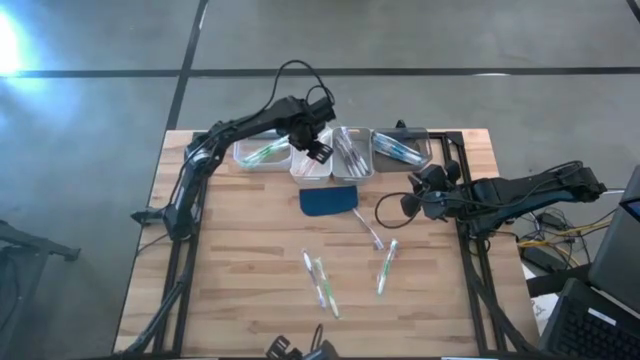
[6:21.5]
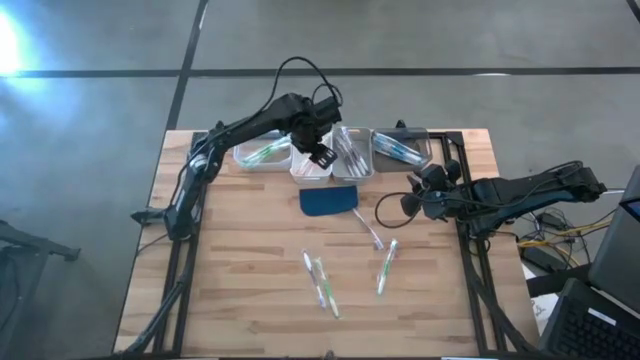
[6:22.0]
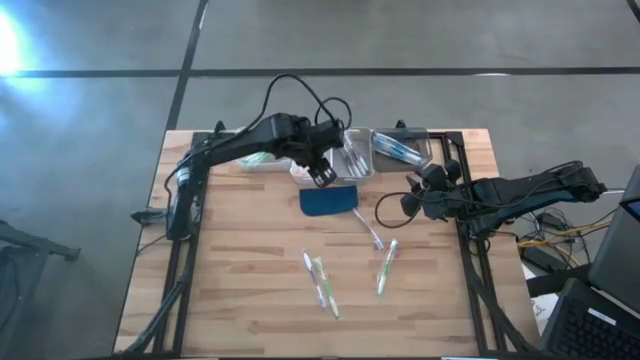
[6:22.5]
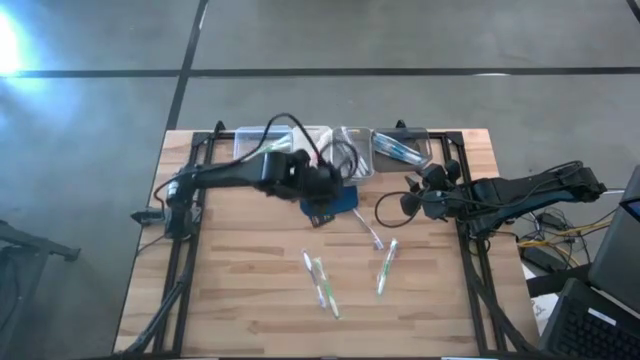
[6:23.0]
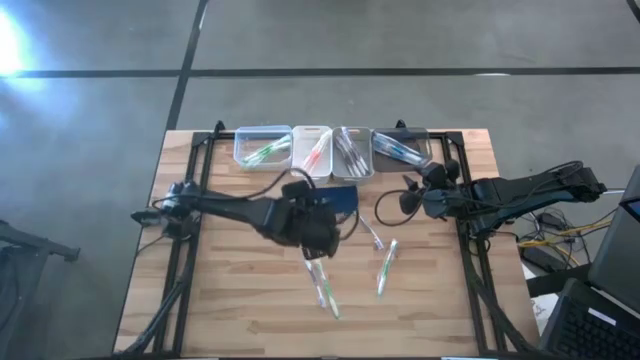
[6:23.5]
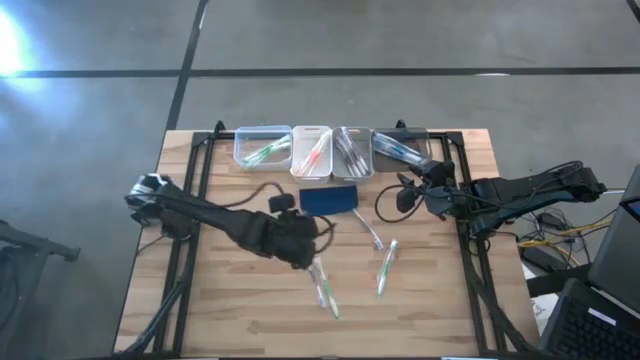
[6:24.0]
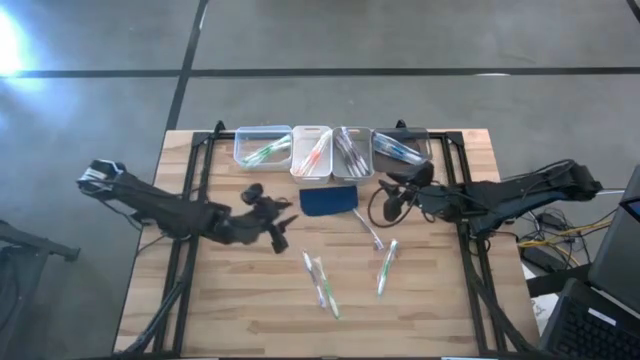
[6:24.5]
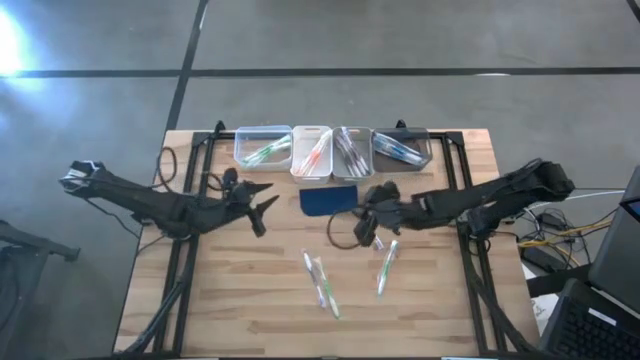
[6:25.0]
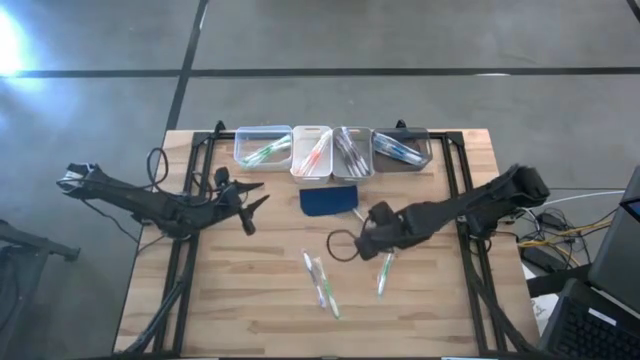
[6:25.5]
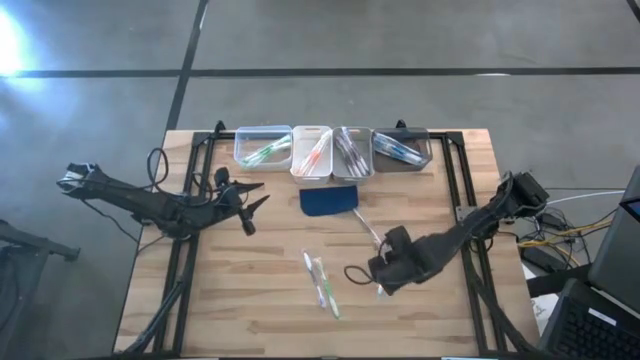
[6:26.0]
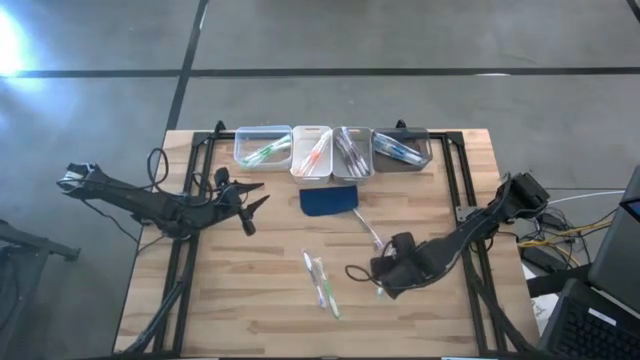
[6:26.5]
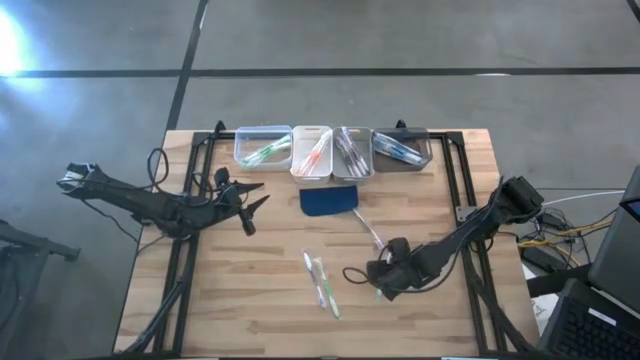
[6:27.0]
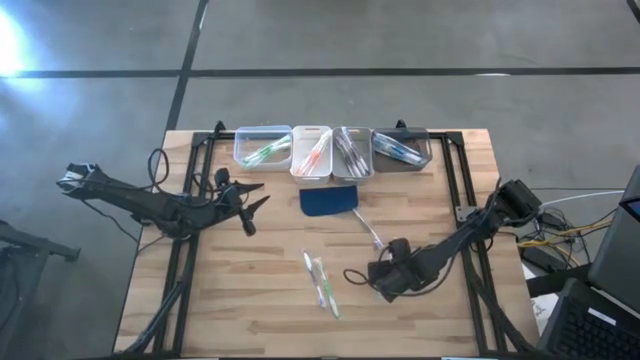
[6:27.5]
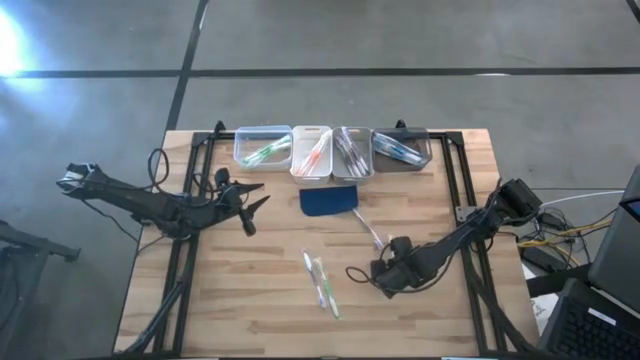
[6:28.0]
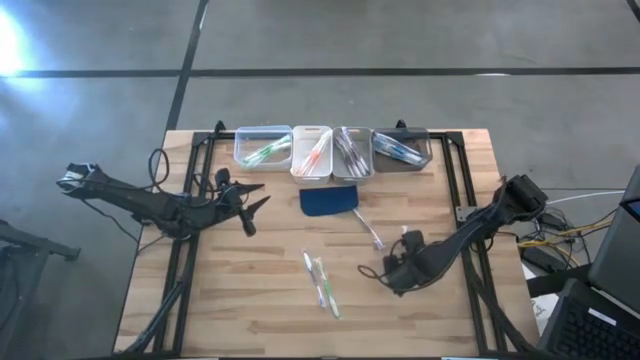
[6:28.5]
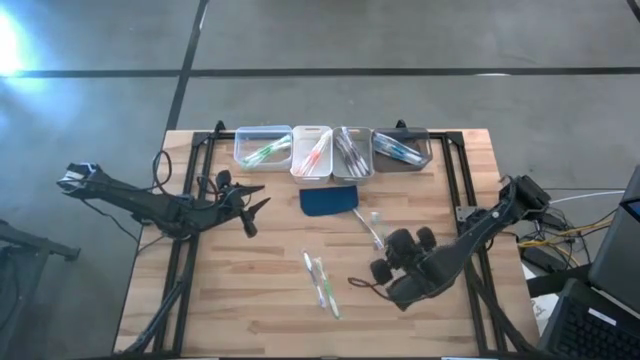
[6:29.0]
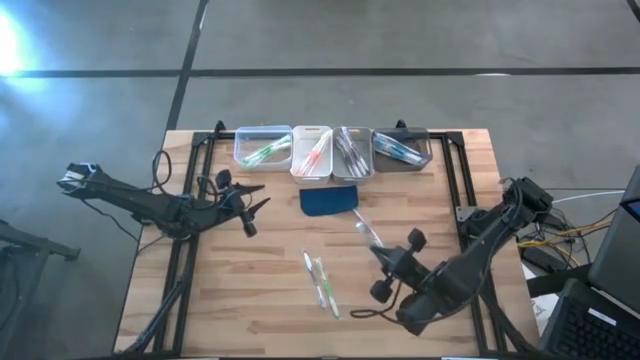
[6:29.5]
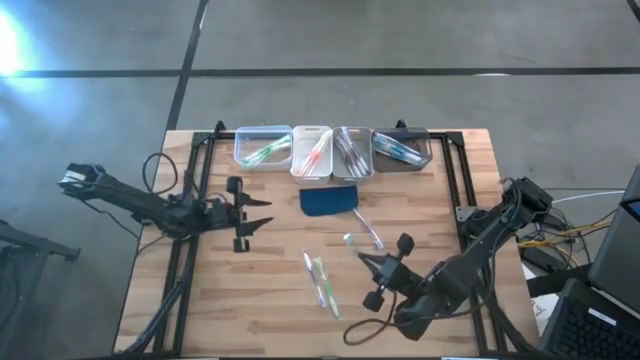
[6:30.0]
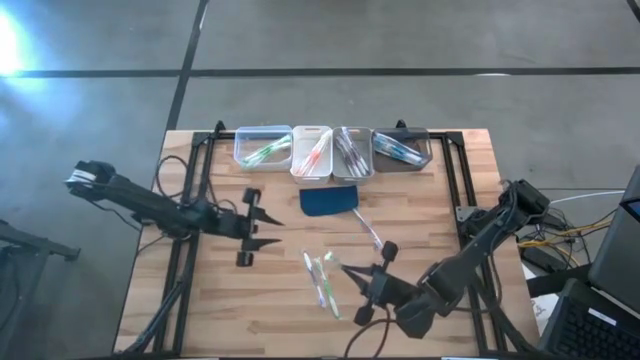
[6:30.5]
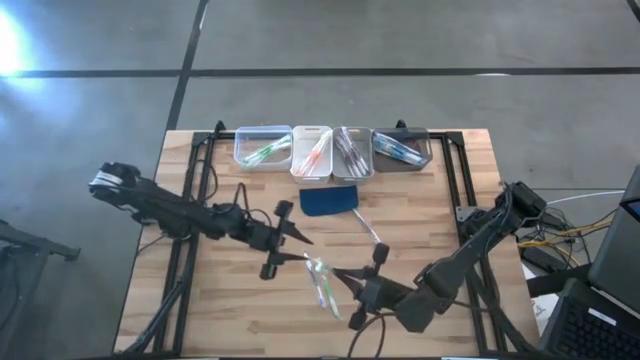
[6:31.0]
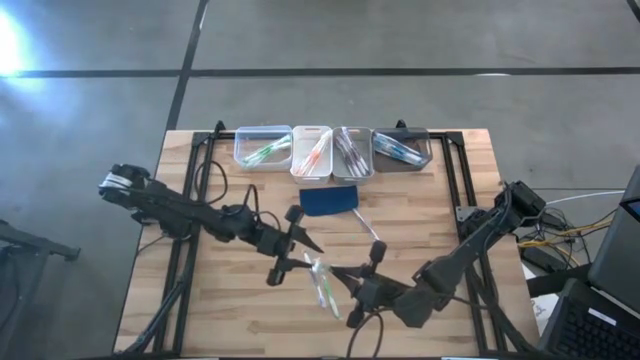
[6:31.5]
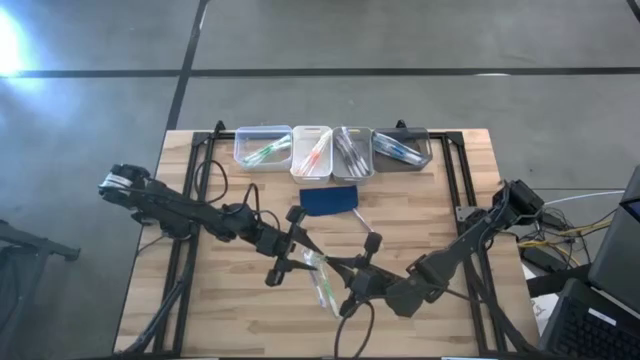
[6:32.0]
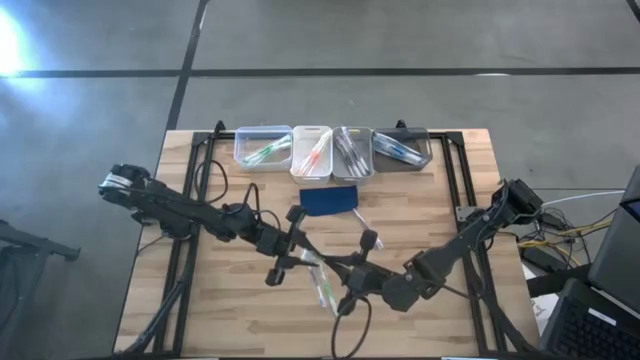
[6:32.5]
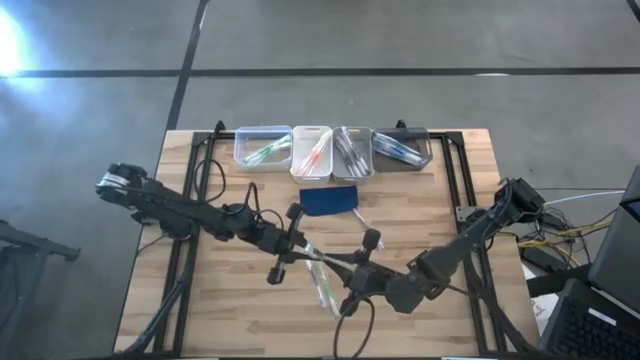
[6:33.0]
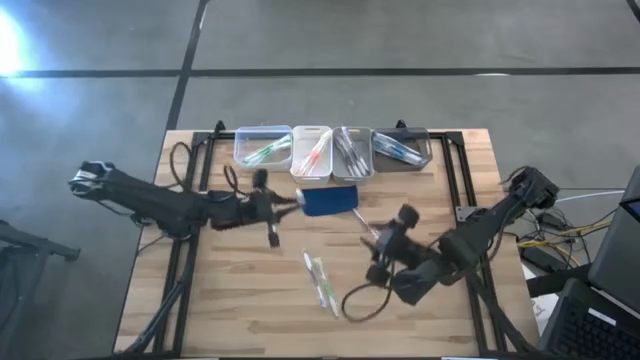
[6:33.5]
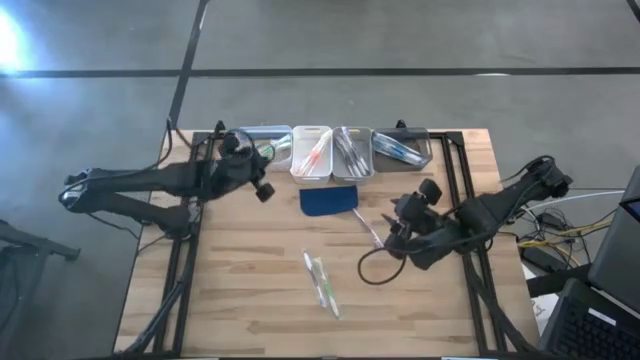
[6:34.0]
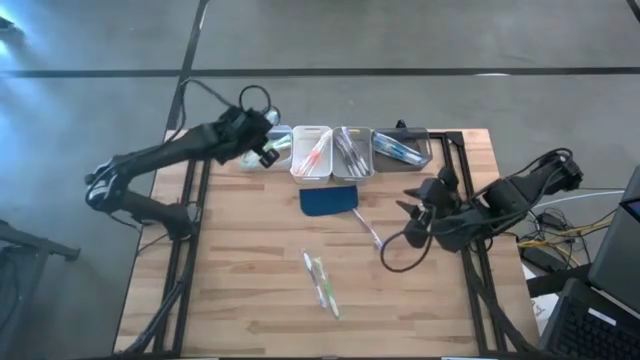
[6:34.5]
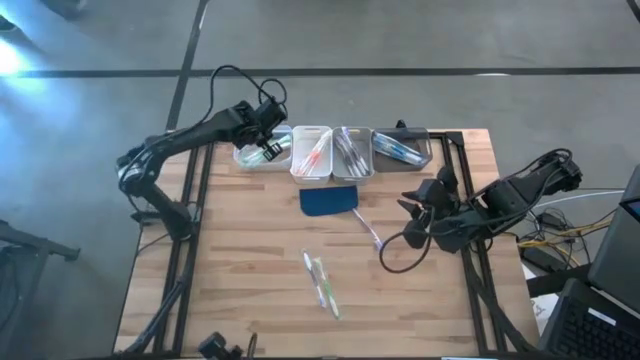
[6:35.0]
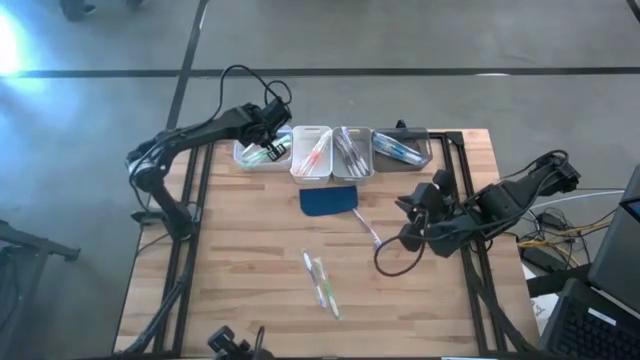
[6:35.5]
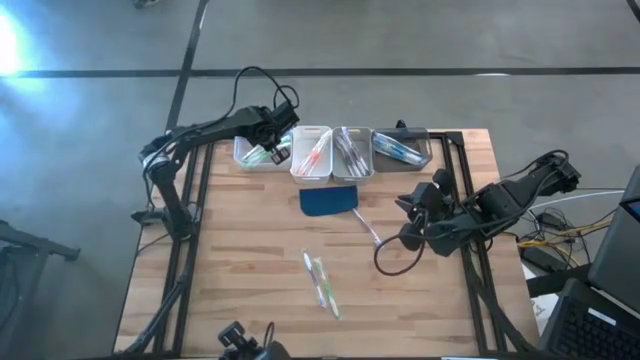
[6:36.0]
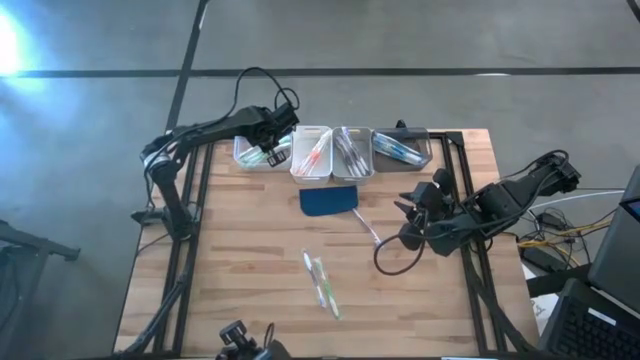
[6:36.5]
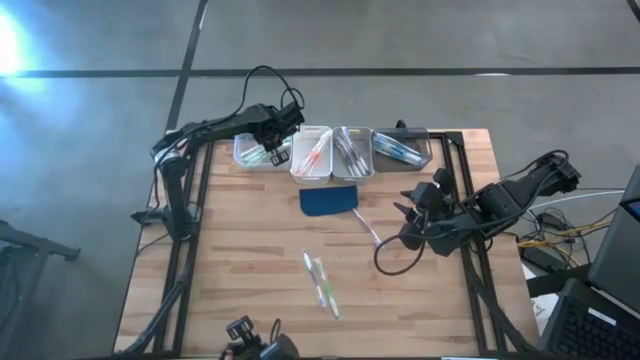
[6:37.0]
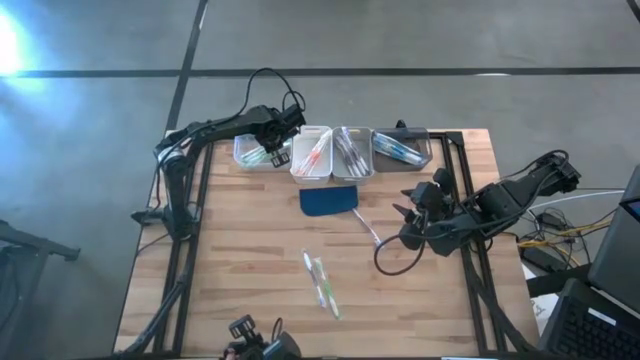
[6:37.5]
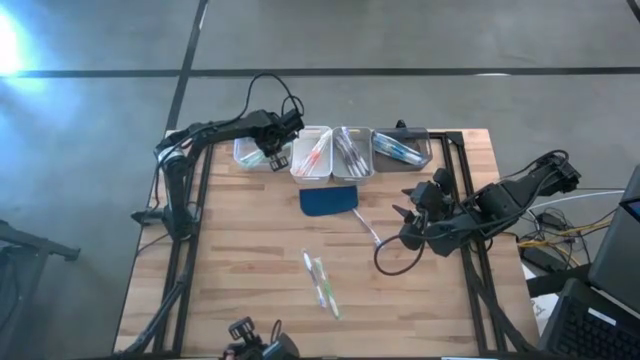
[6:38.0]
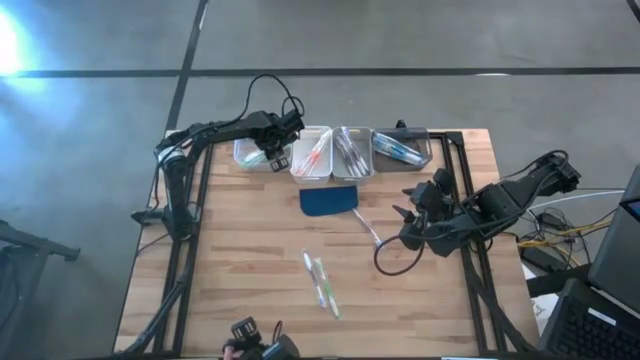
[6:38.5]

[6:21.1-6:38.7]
Task: Pick & Place Toothbrushes
Put the green toothbrush into the transparent bin

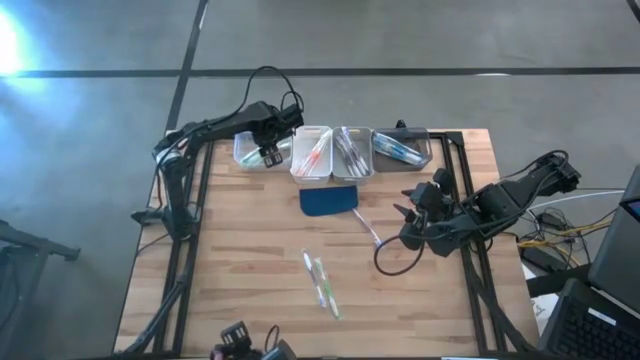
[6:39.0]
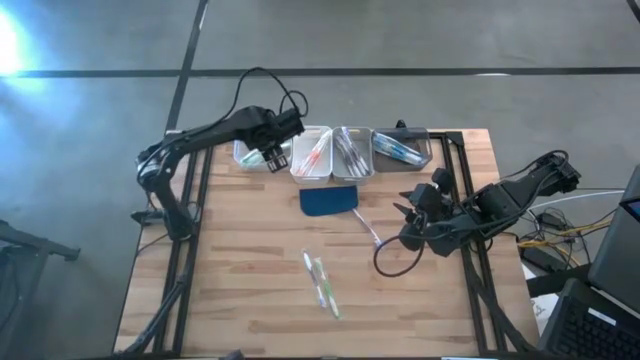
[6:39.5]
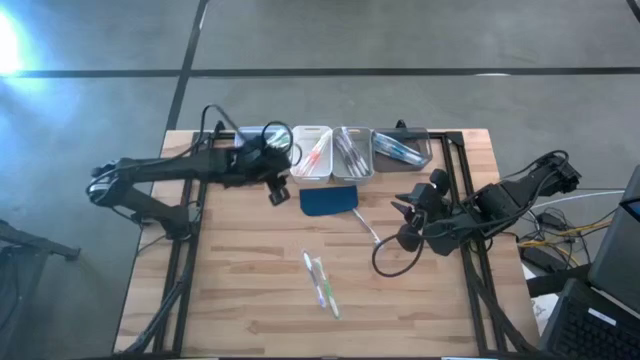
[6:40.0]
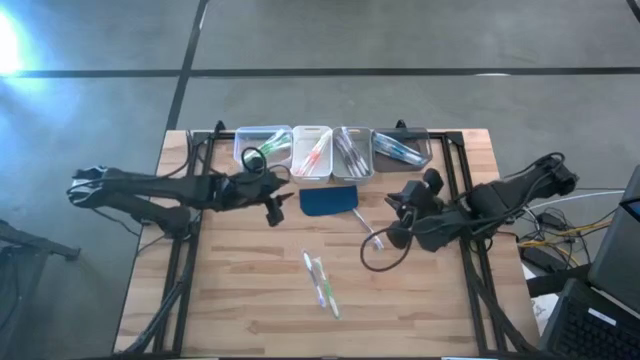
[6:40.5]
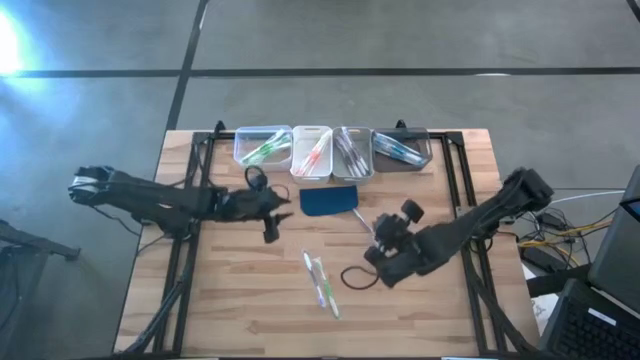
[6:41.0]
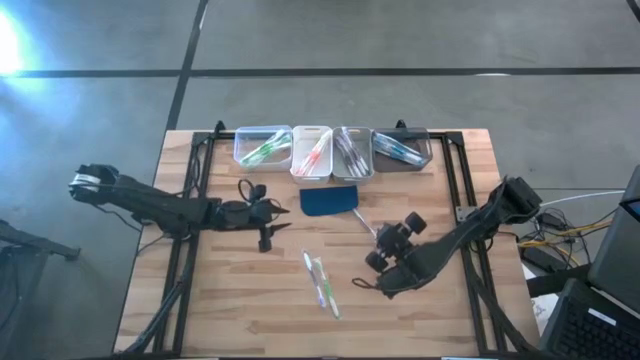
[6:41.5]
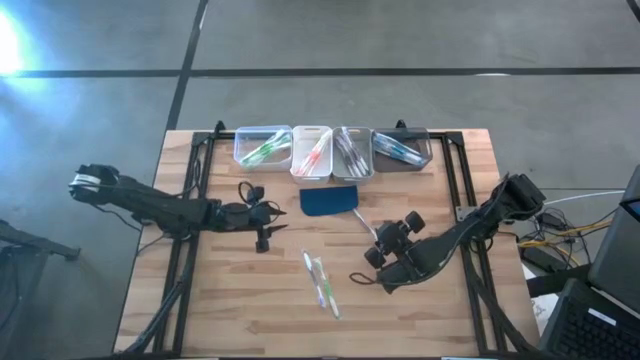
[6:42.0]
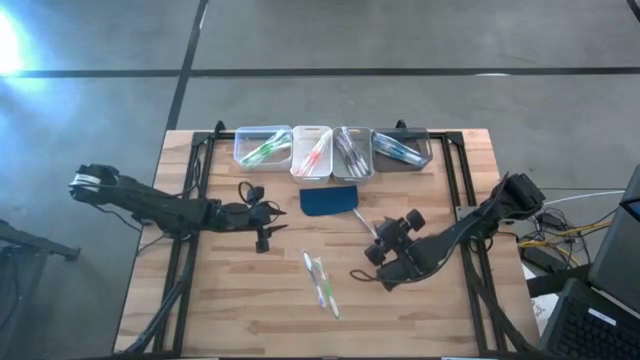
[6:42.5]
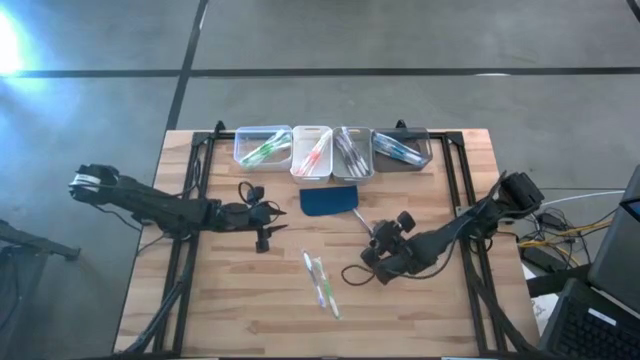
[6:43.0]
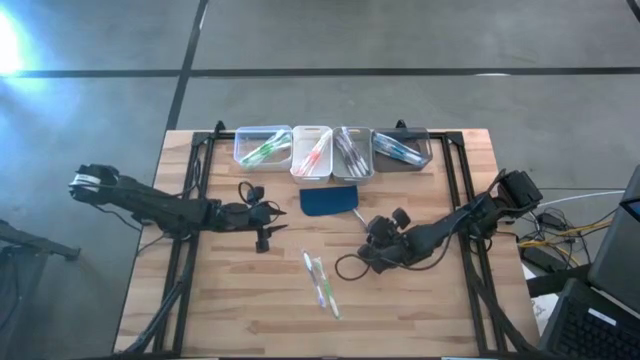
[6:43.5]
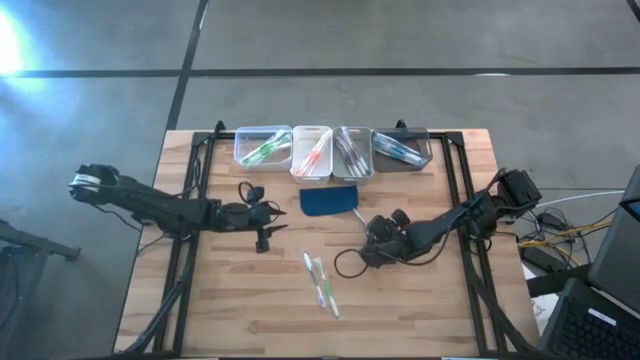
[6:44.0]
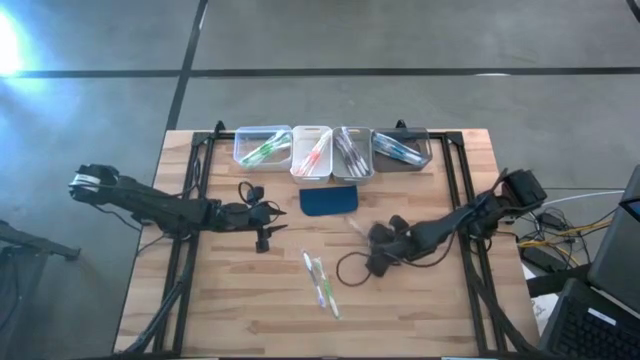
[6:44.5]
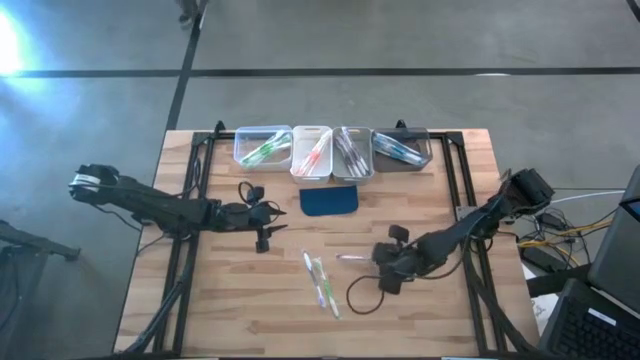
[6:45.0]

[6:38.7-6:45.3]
Put the violet toothbrush into the gray bin
